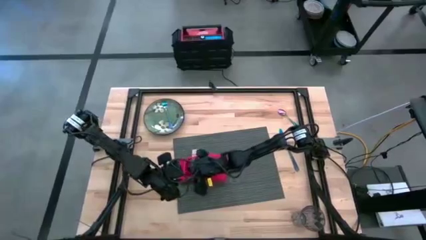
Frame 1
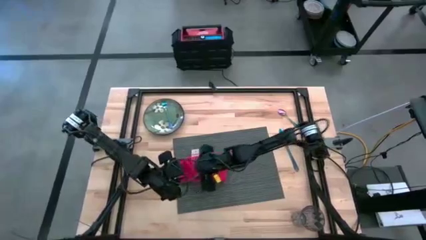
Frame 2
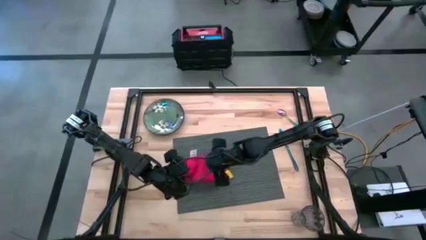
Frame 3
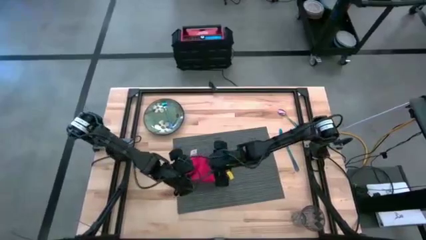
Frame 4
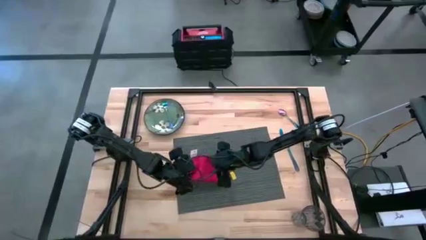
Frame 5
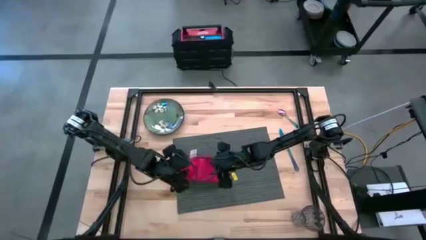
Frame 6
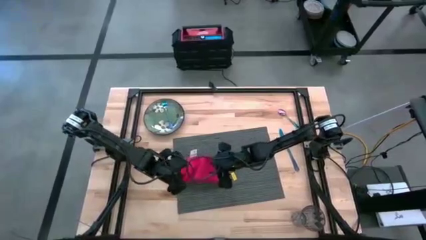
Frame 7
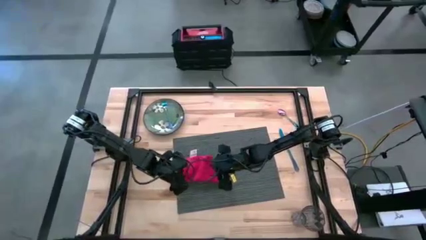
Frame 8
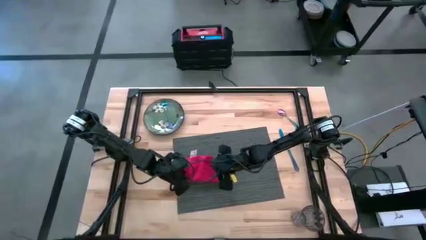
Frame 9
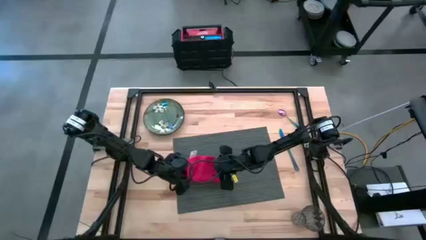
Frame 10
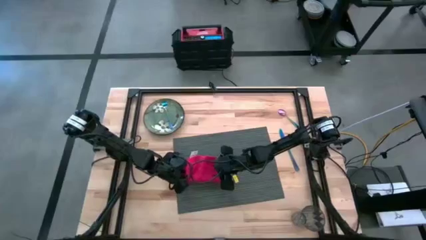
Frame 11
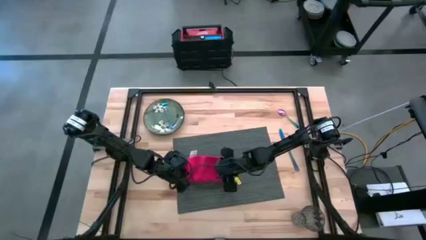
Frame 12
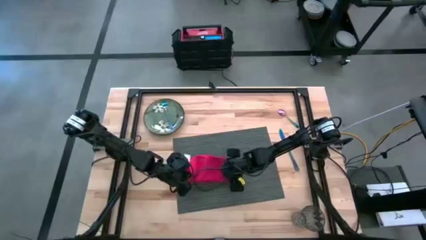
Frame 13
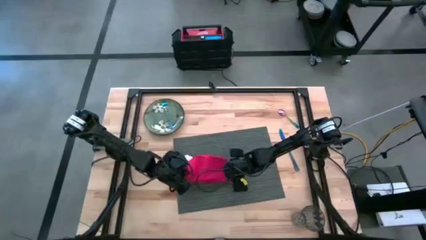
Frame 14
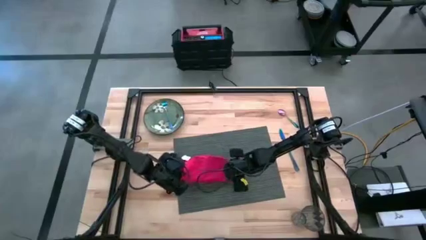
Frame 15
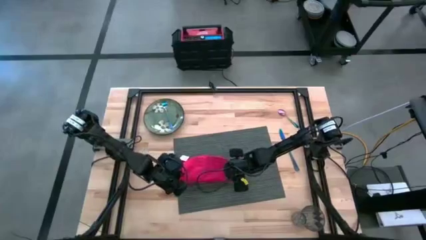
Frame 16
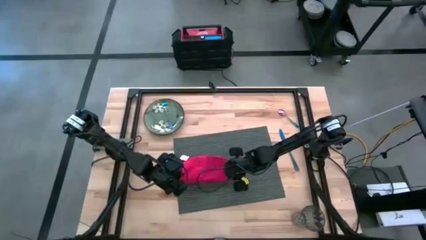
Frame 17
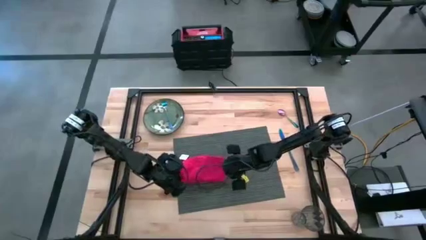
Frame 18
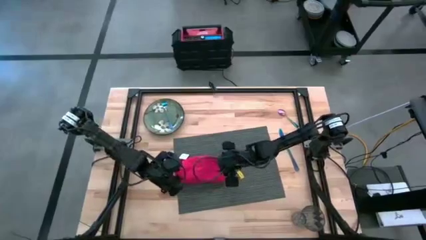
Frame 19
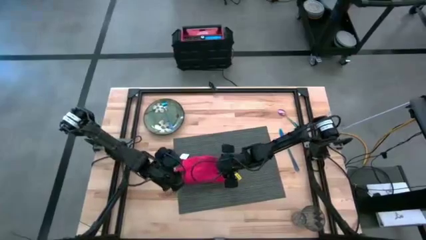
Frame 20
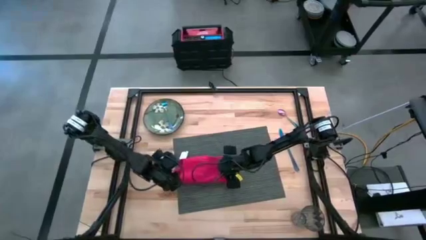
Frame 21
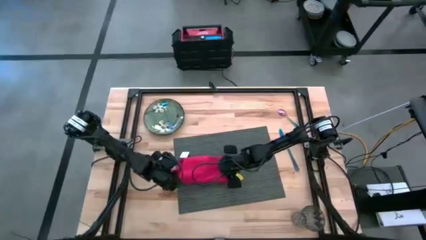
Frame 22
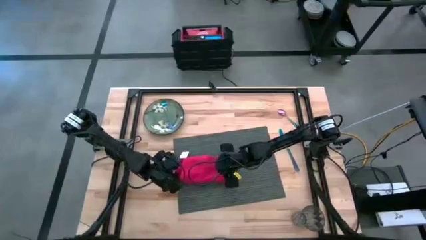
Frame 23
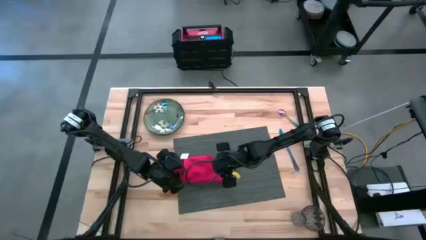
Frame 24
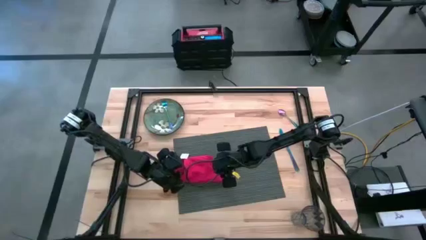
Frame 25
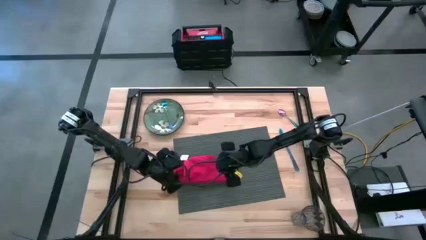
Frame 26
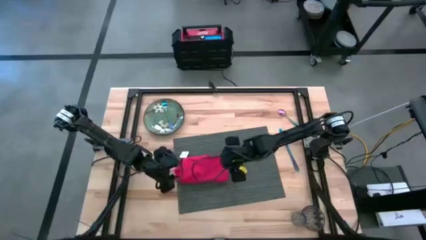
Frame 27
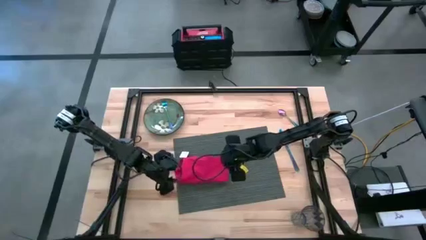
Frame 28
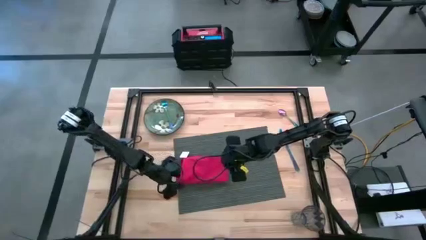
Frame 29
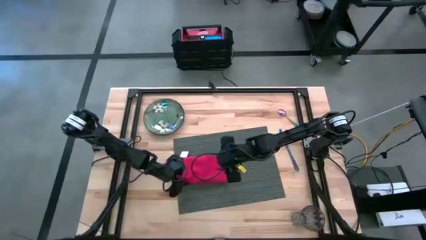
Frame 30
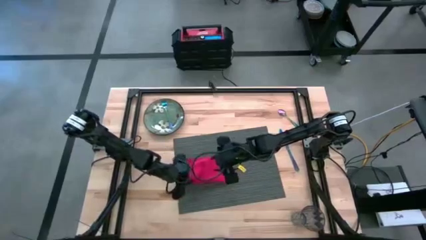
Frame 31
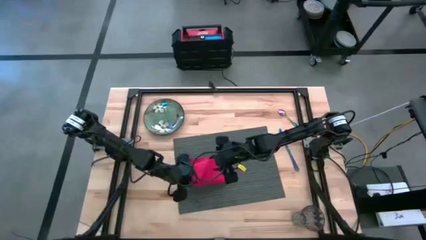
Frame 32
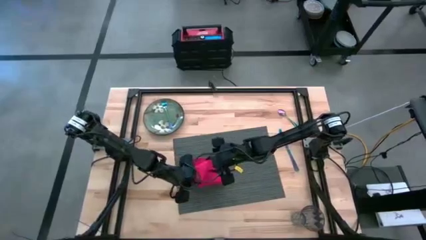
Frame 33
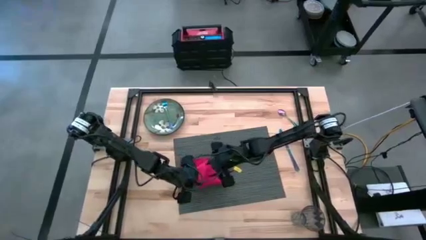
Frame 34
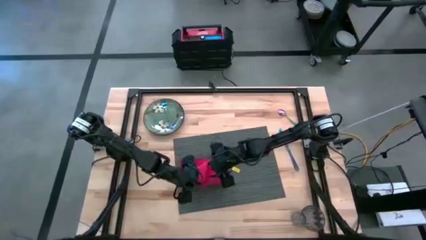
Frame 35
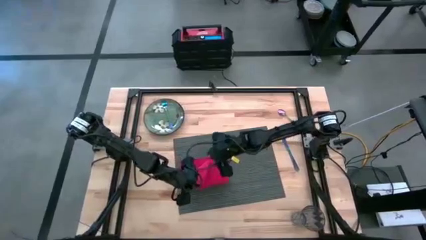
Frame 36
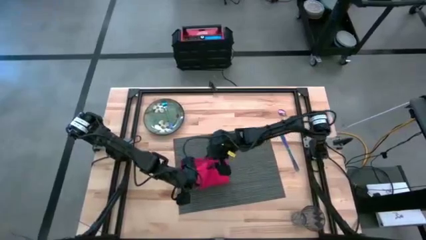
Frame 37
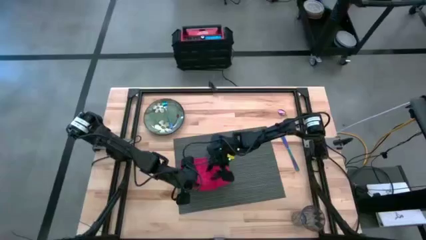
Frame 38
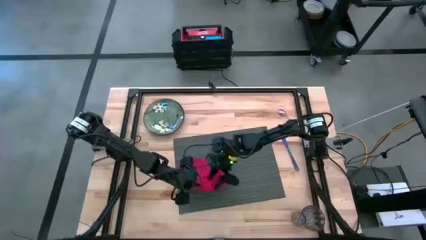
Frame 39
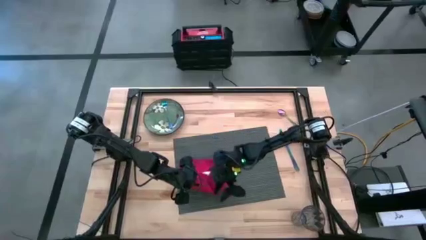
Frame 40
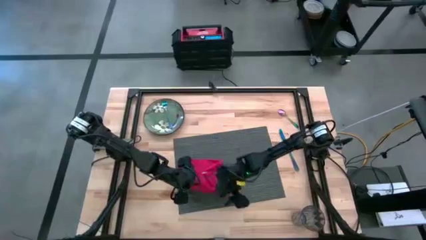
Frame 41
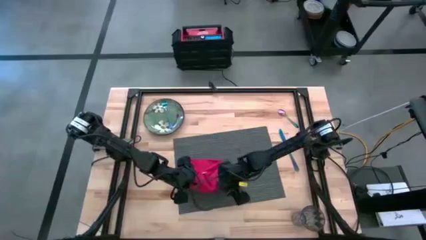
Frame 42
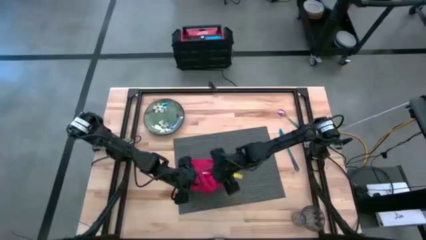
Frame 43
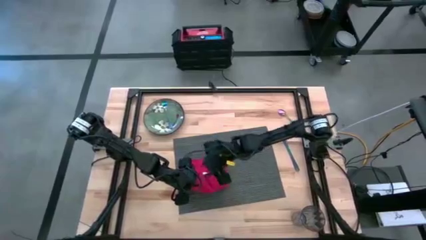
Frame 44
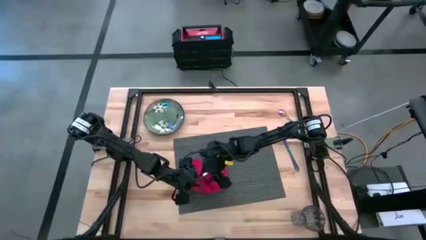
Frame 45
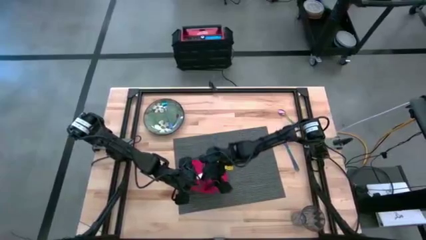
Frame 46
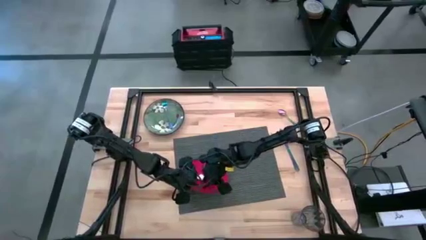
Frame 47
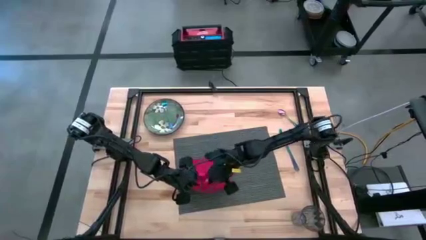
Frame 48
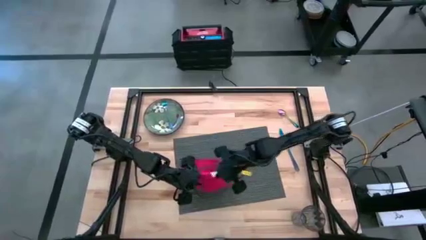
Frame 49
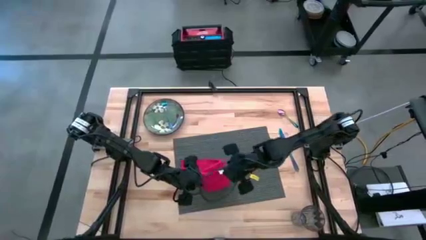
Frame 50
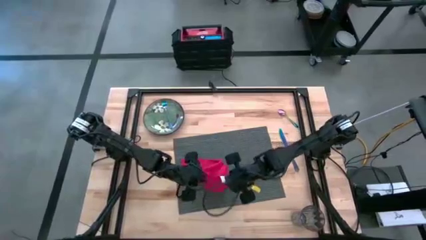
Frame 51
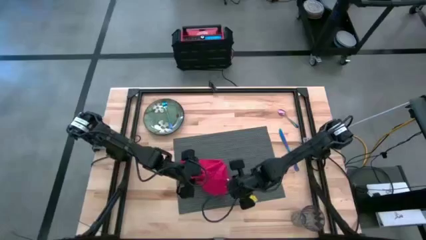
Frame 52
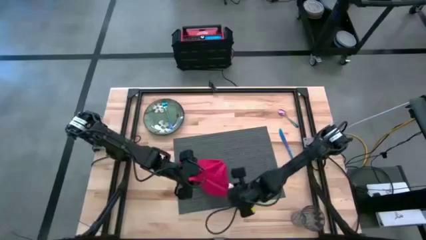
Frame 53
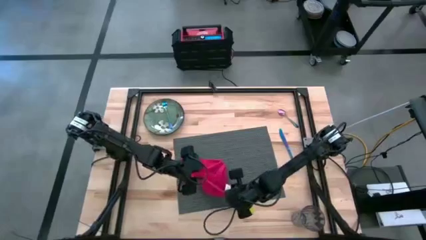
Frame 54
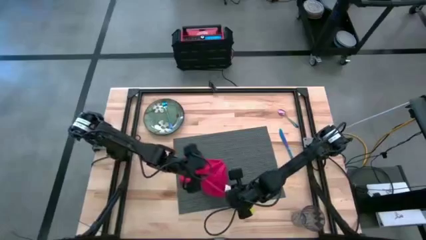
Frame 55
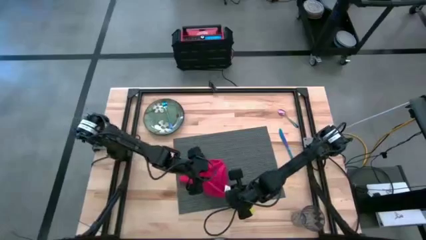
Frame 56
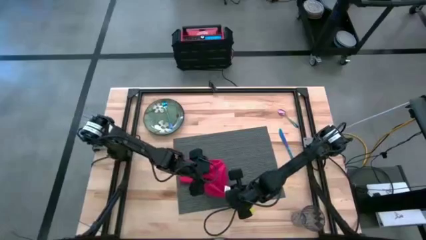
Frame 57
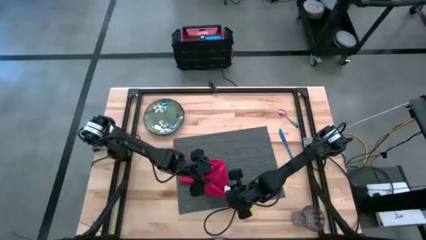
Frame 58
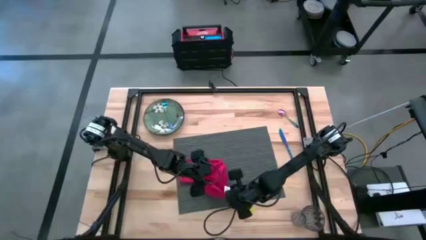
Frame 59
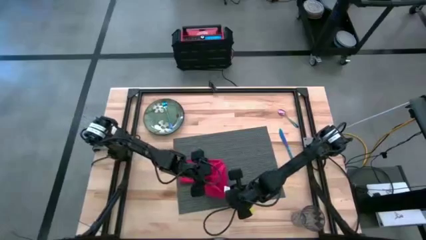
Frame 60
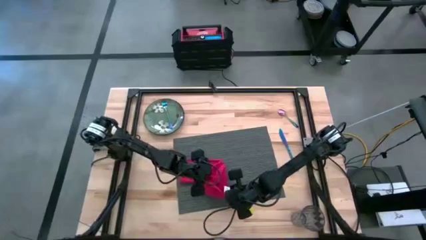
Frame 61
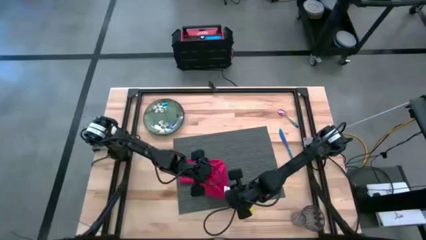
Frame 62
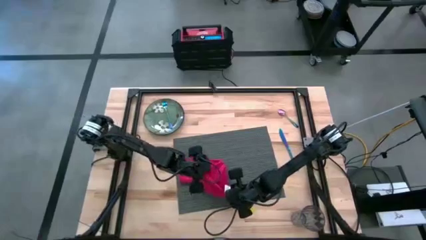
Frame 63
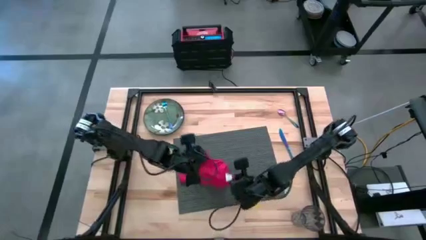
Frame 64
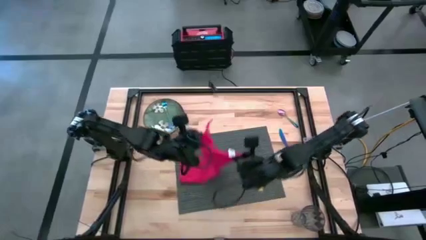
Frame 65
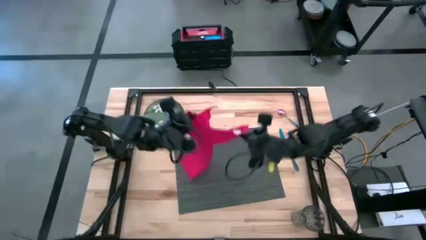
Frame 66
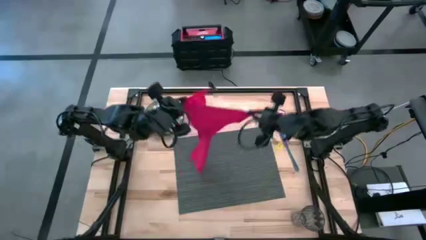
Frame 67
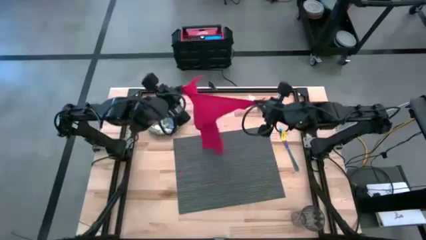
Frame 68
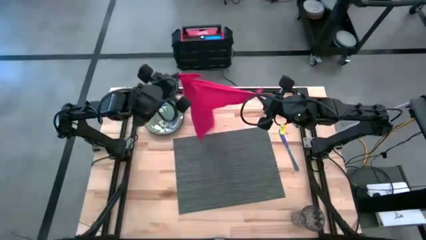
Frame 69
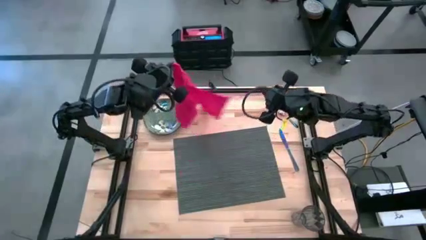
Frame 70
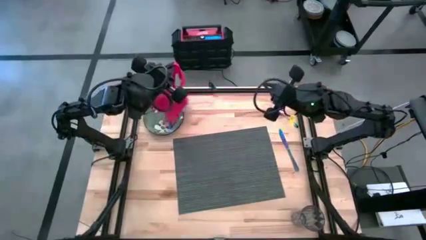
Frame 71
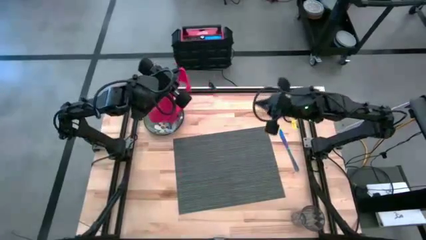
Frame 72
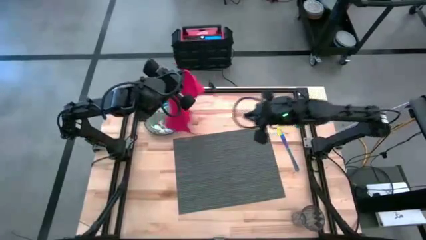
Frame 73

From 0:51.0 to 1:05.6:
Task: Set table place
Fold the red table napkin
